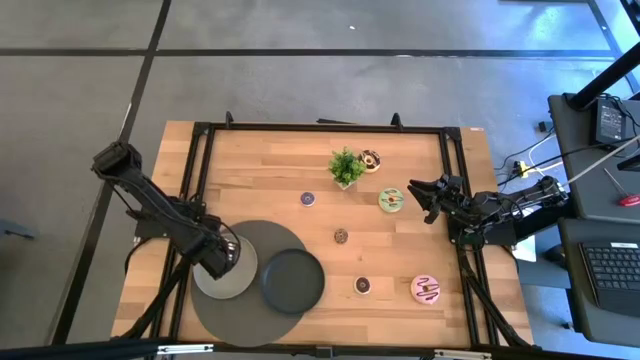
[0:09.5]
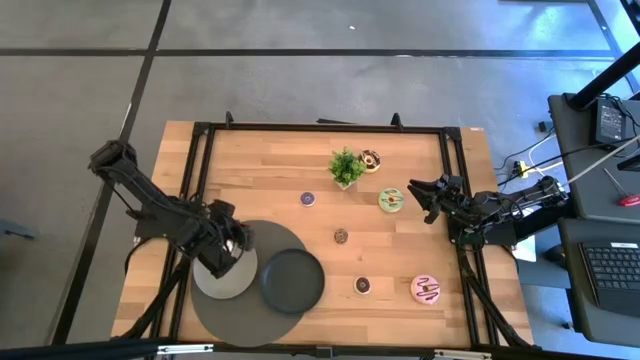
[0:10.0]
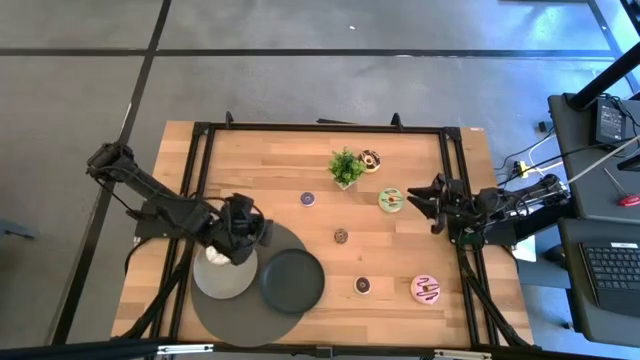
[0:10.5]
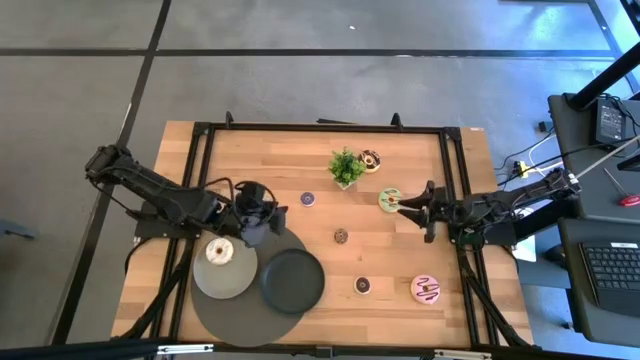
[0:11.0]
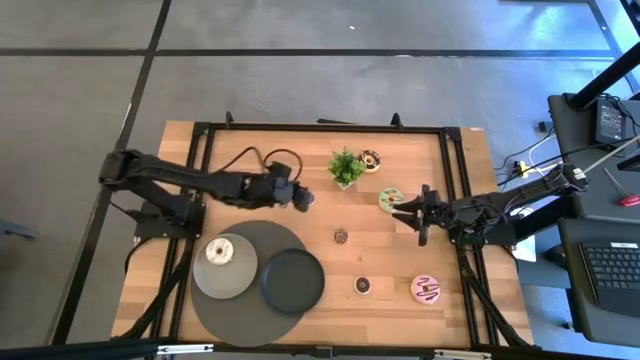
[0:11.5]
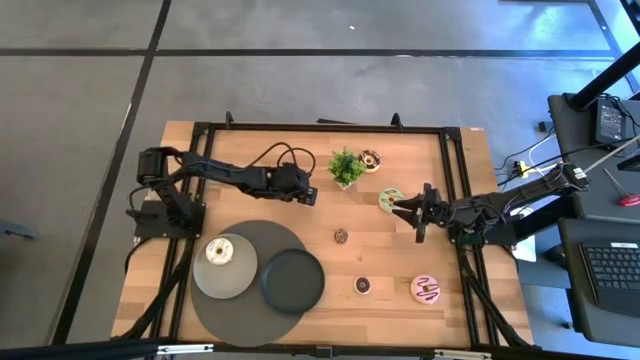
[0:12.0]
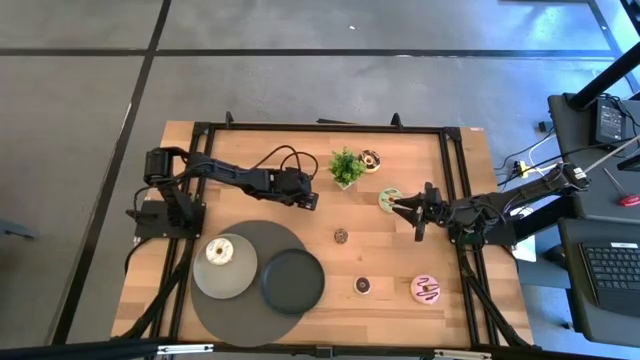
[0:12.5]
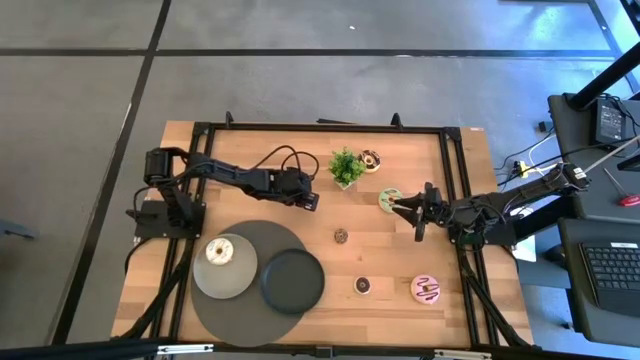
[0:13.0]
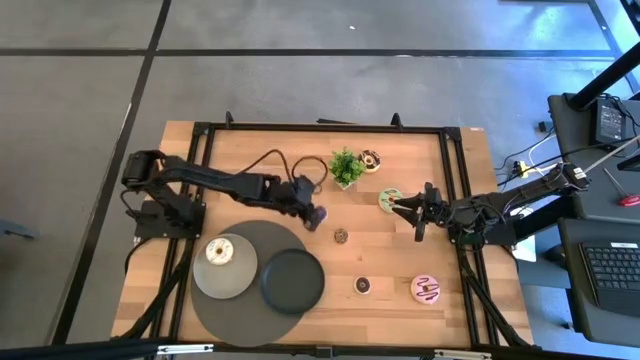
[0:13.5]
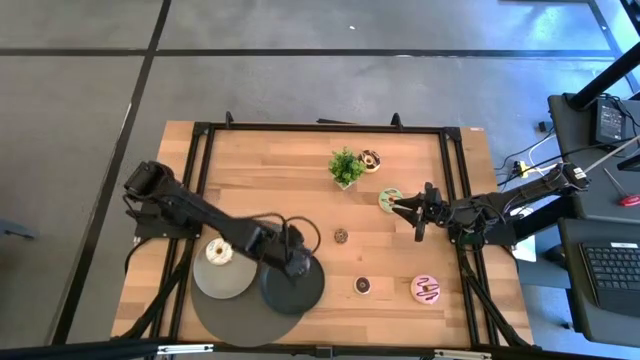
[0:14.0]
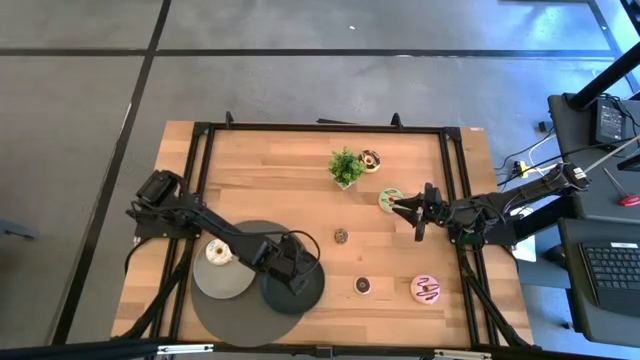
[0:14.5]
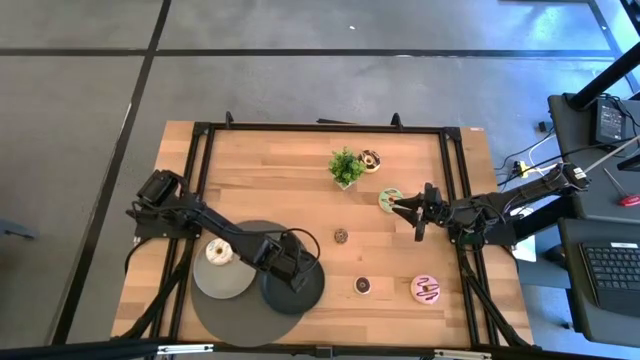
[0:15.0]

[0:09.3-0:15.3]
Task: Pick & Place donuts
Put the small blue donut on the black plate

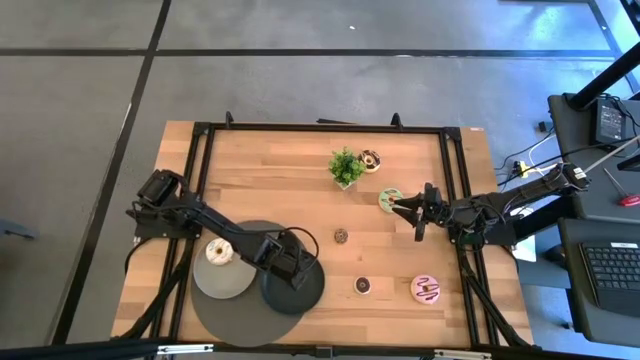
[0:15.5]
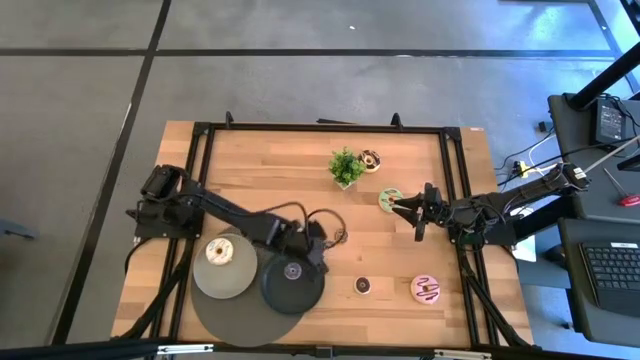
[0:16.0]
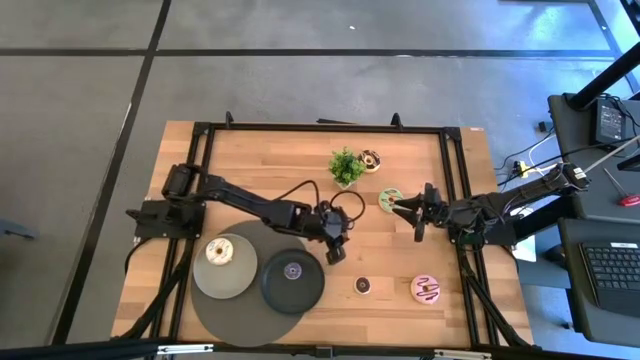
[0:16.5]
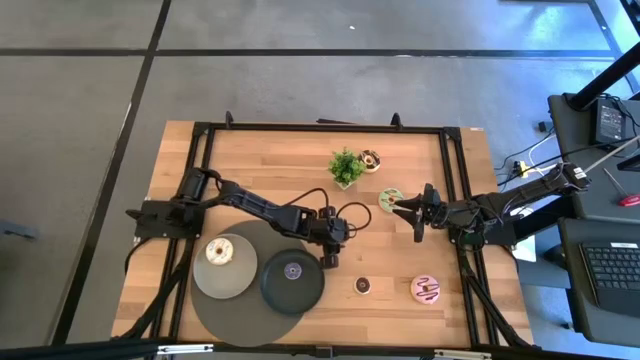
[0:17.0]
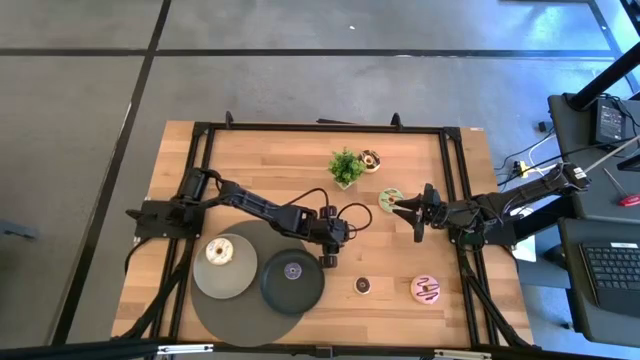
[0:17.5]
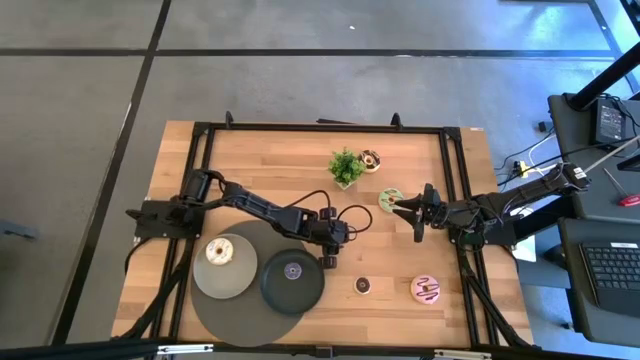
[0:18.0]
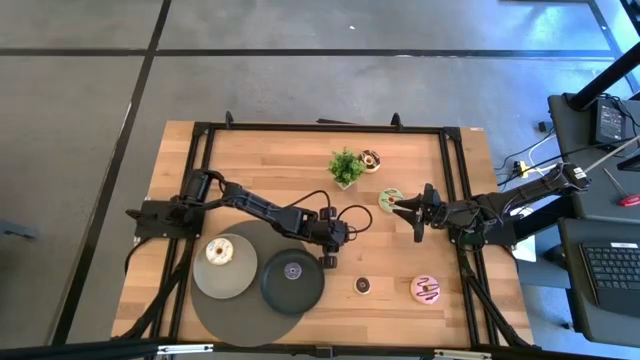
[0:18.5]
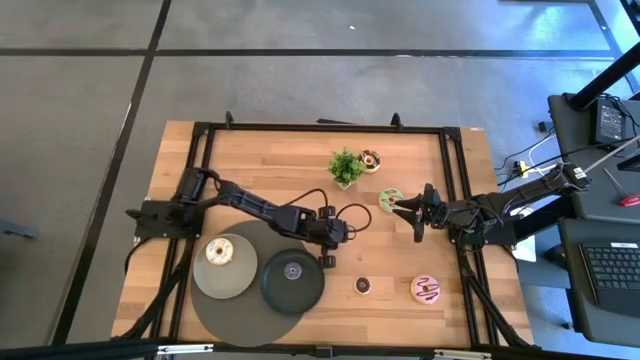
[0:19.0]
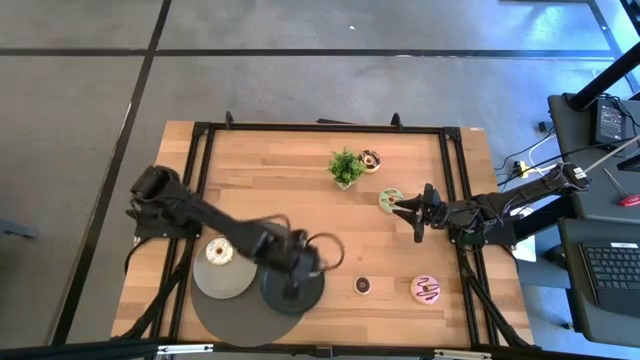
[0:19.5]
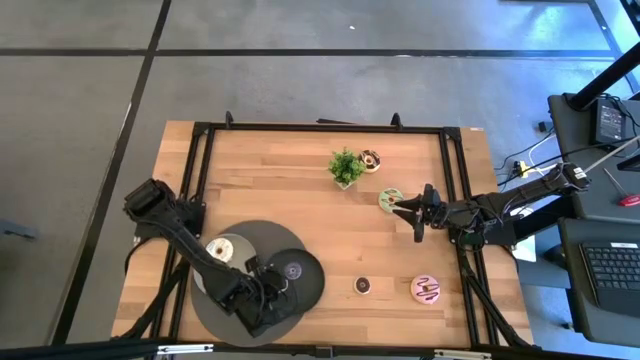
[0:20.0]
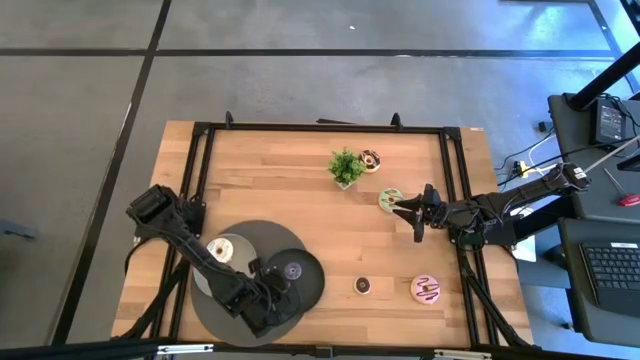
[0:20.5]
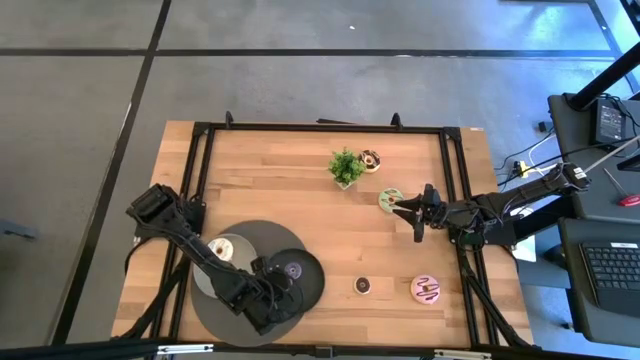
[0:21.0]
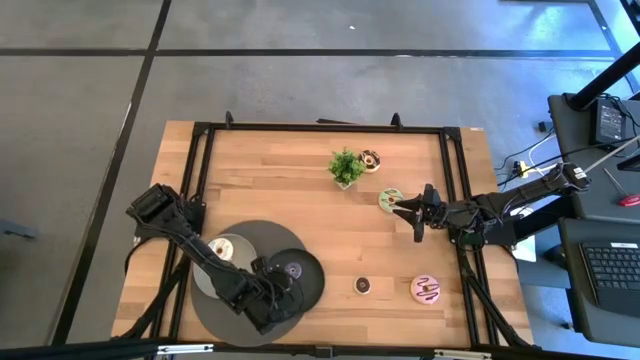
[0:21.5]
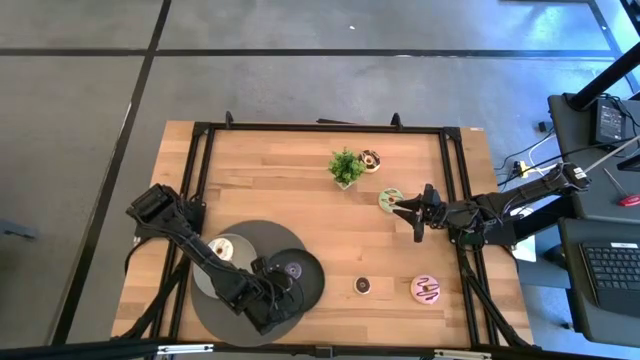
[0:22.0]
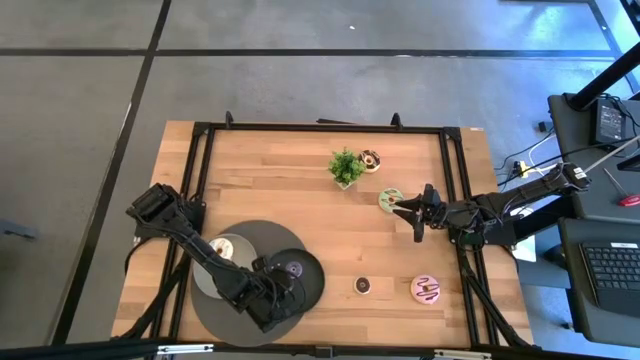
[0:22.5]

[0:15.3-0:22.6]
Put the small brown donut on the black plate

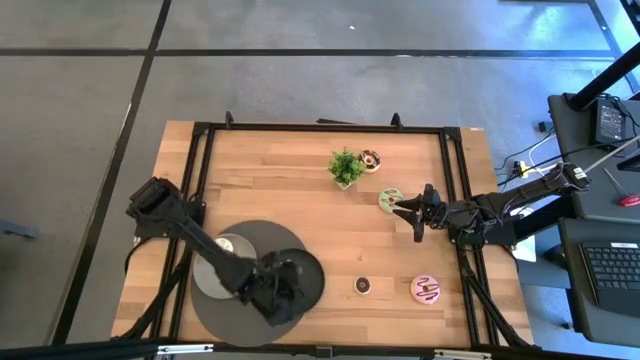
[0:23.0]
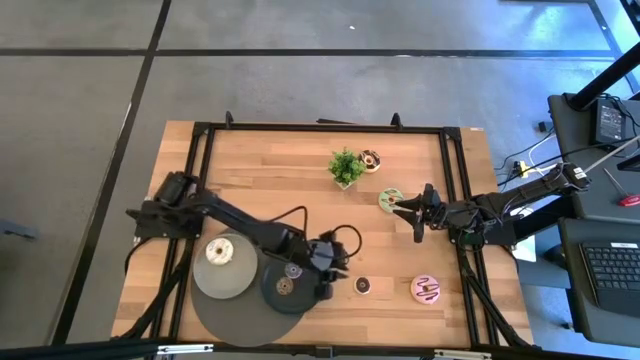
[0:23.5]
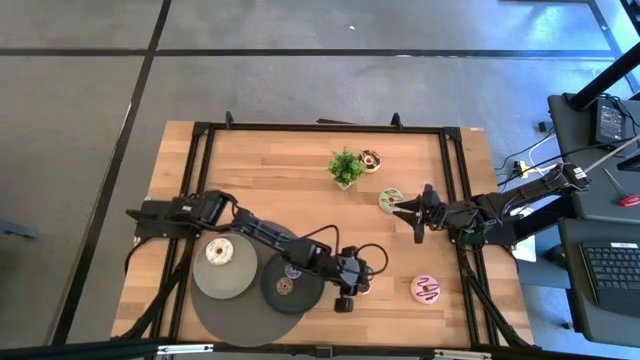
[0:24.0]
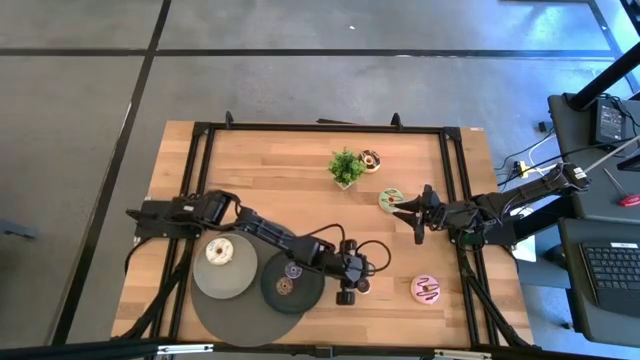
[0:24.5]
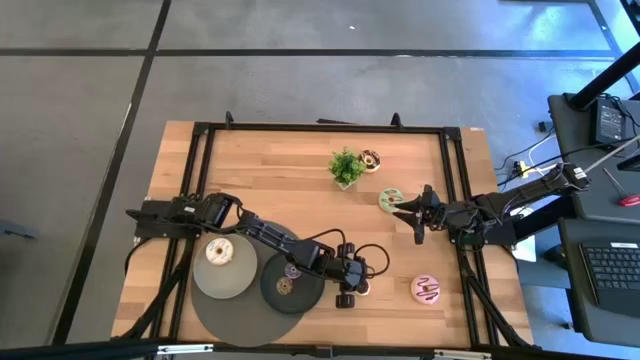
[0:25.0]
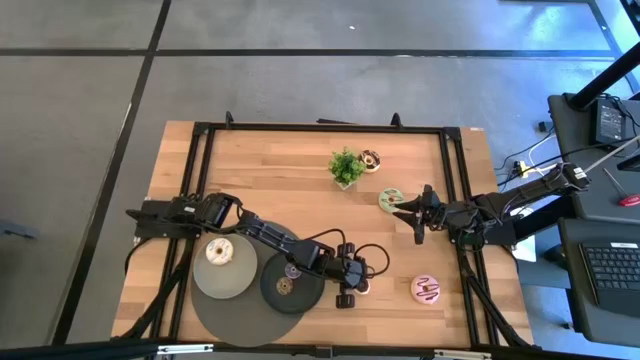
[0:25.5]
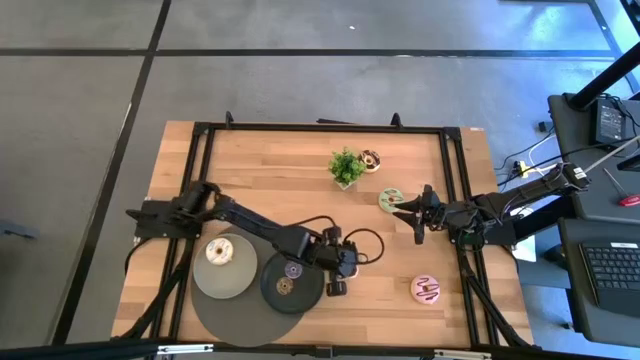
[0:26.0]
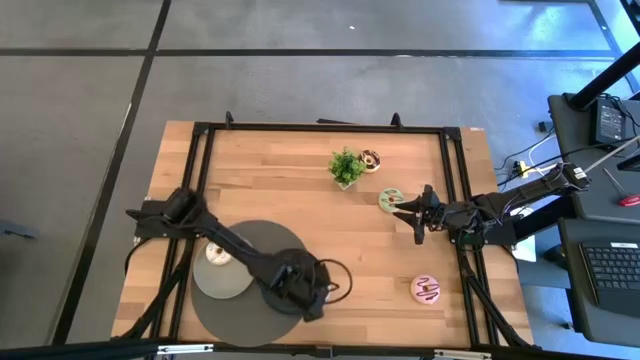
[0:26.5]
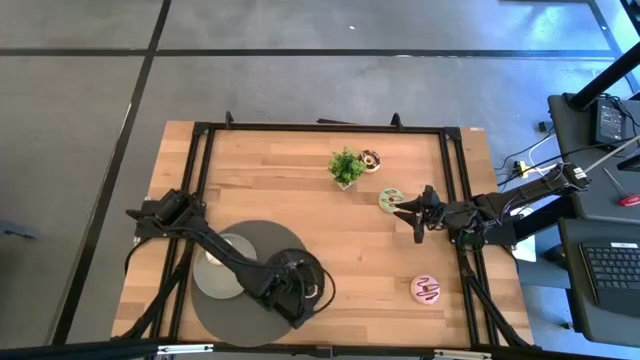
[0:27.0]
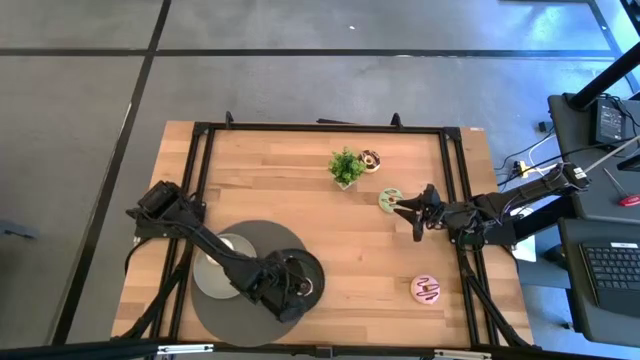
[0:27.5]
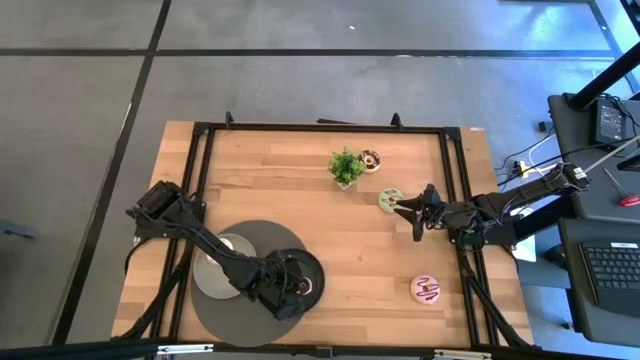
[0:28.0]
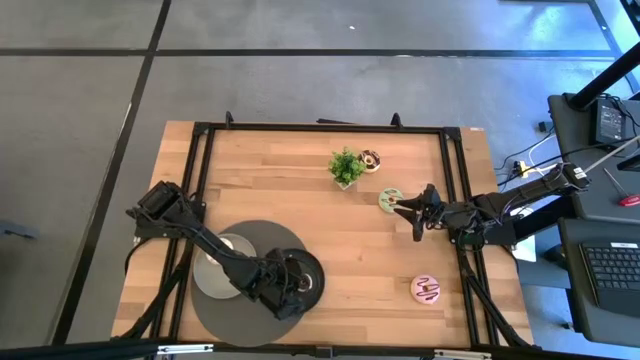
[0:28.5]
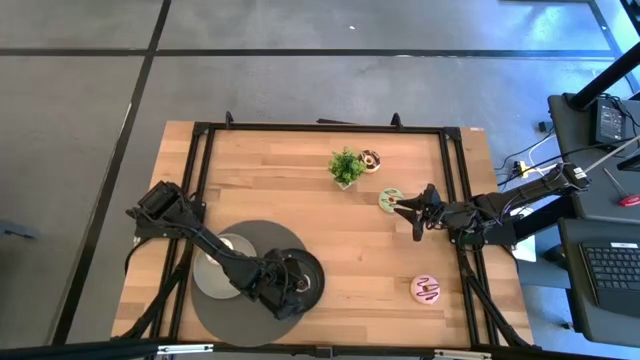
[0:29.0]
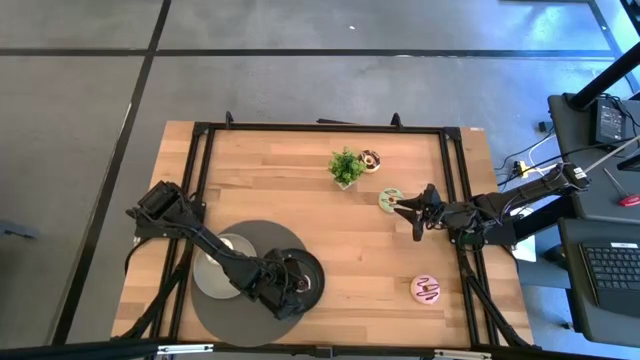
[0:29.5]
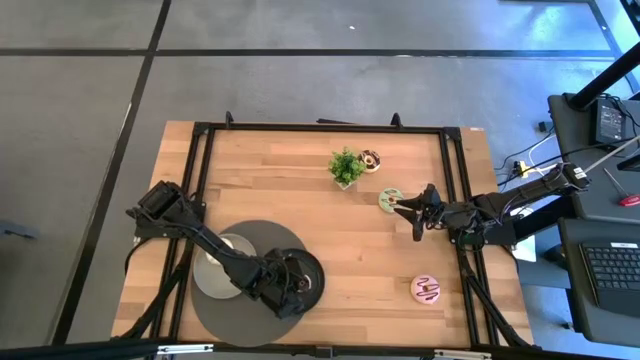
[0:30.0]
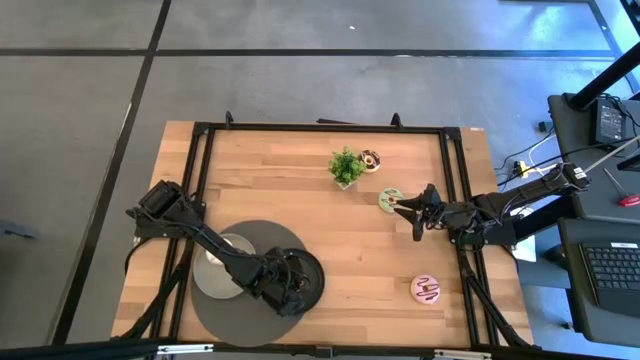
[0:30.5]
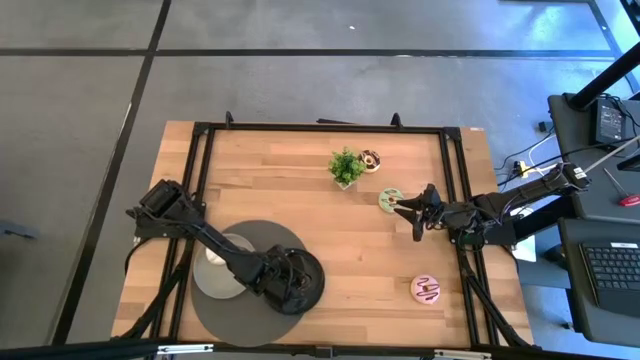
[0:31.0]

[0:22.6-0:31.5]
Put the small dark brown donut on the black plate
